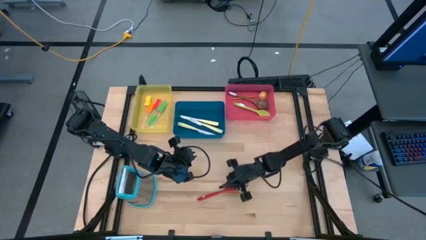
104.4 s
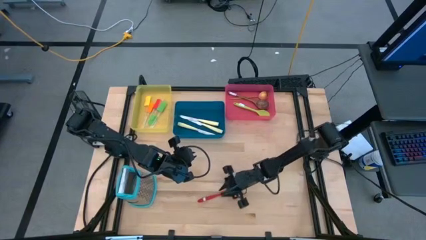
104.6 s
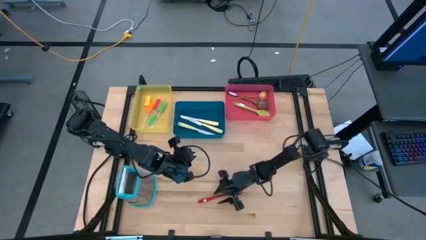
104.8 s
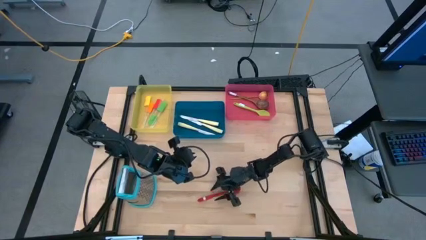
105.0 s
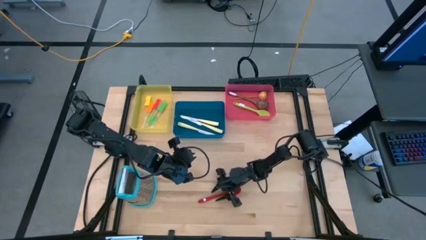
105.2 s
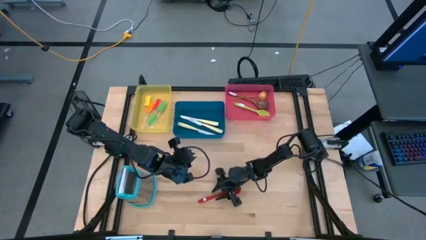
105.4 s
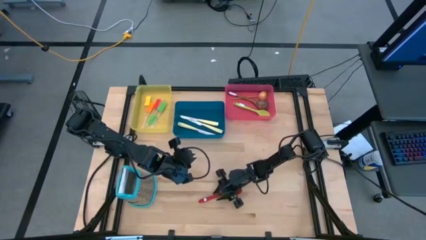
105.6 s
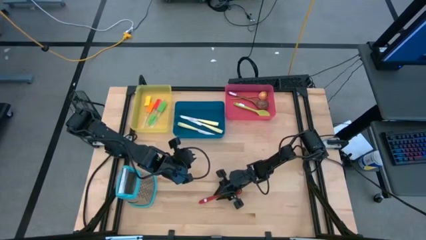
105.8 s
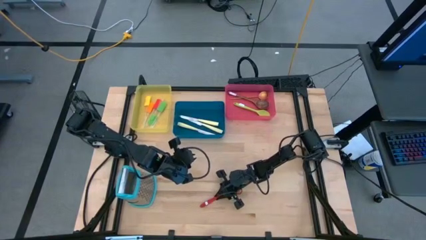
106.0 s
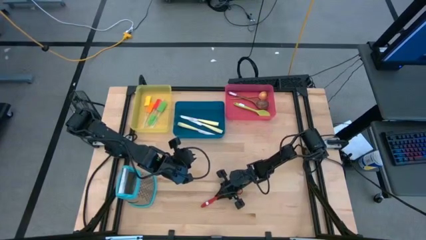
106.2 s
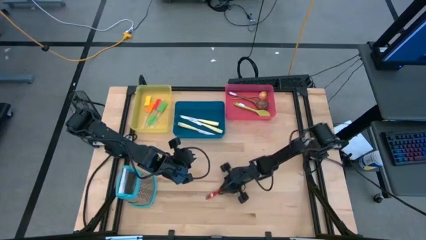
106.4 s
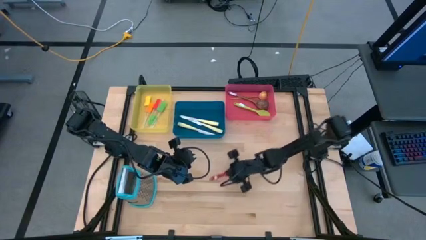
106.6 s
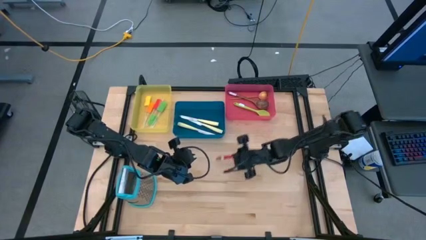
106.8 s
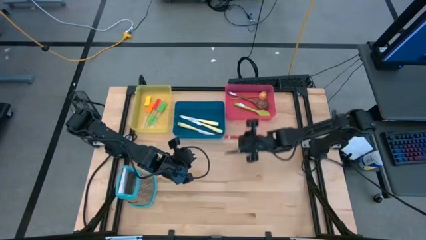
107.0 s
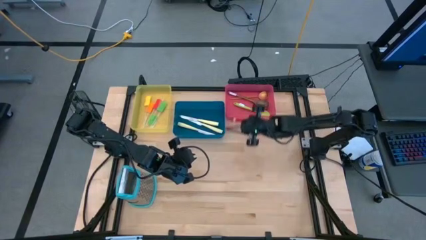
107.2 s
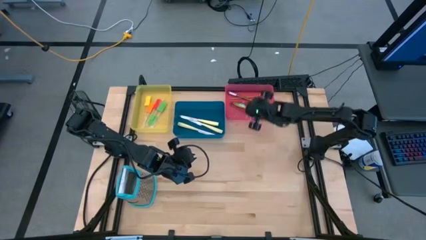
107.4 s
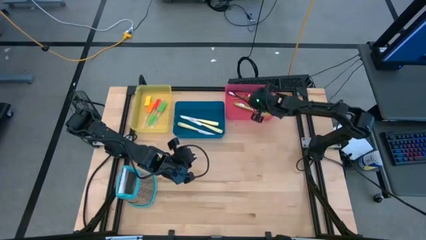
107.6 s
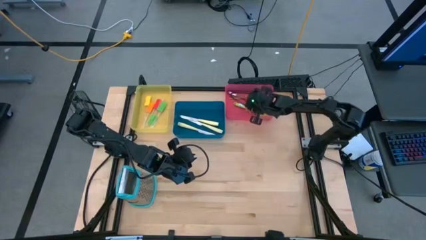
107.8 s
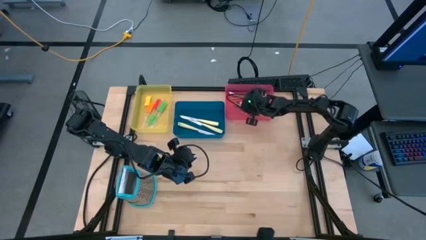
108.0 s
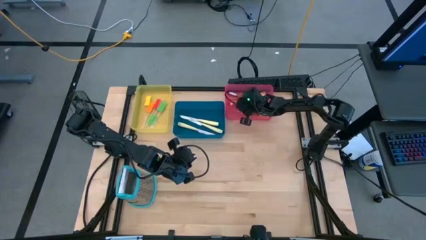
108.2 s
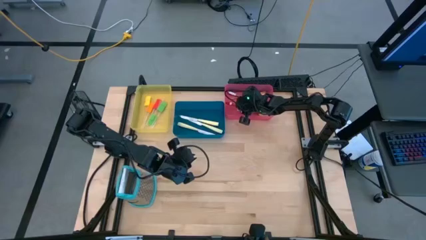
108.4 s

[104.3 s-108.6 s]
Task: Pick & Place Kitchen Items
Put the red serving spoon into the red bin

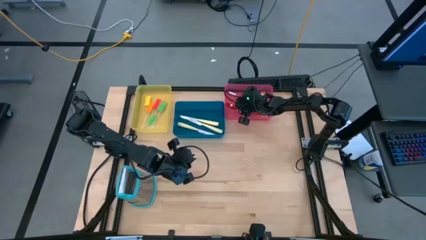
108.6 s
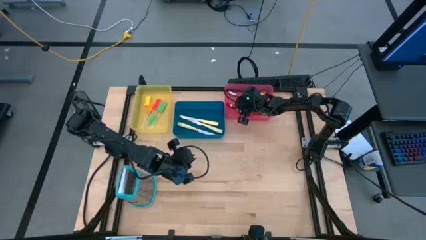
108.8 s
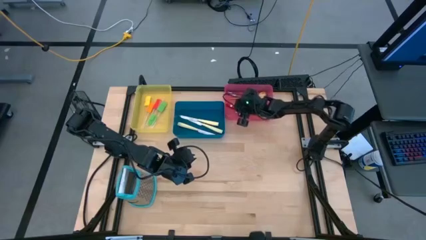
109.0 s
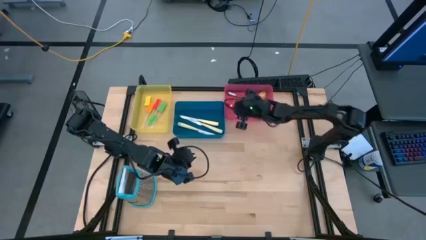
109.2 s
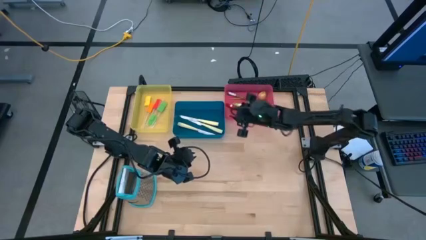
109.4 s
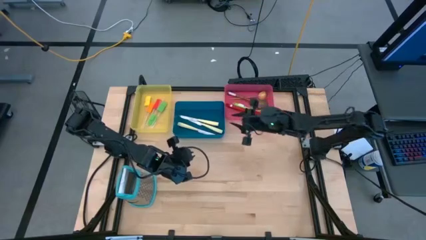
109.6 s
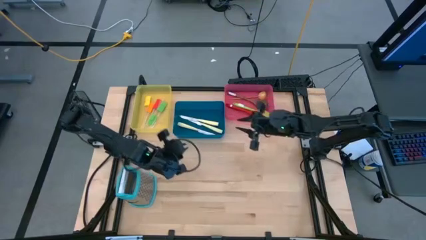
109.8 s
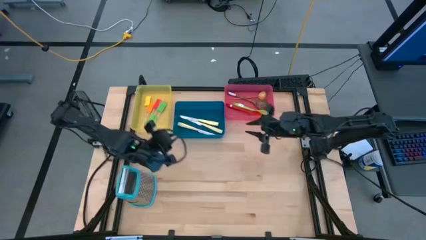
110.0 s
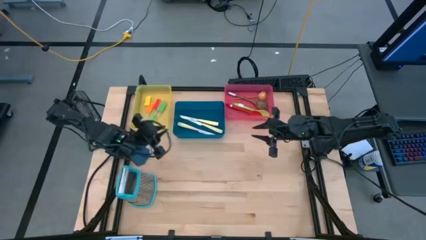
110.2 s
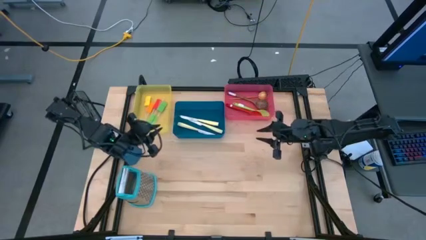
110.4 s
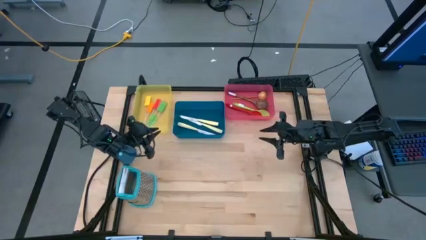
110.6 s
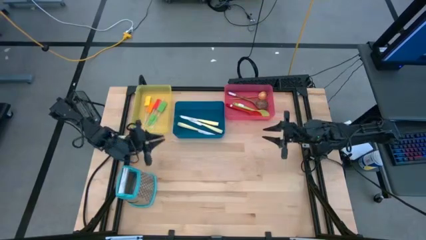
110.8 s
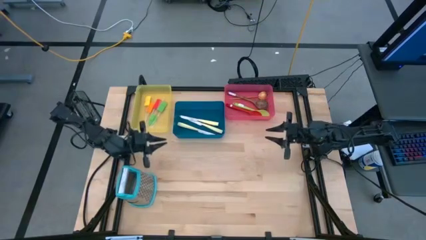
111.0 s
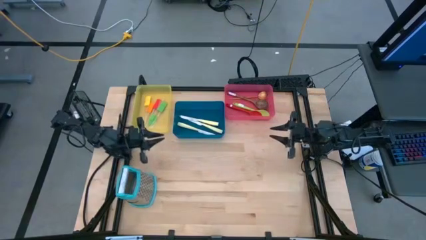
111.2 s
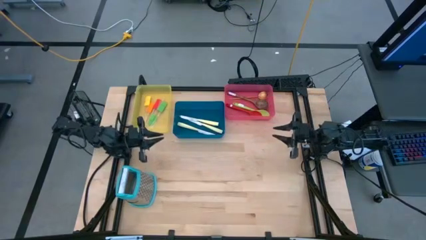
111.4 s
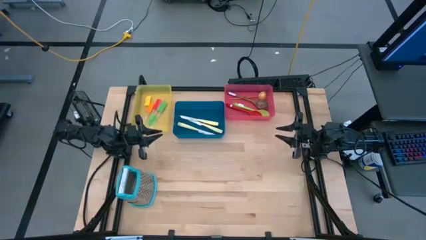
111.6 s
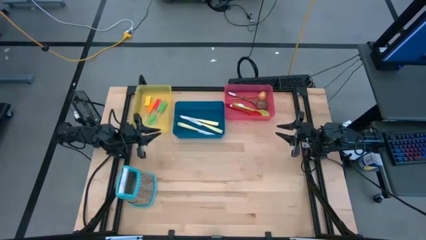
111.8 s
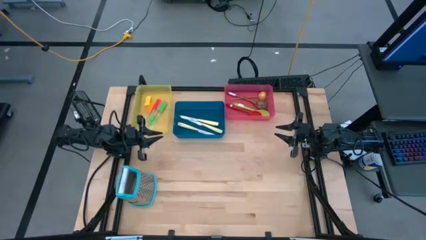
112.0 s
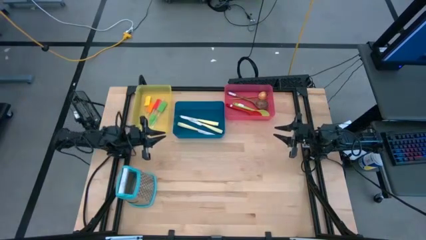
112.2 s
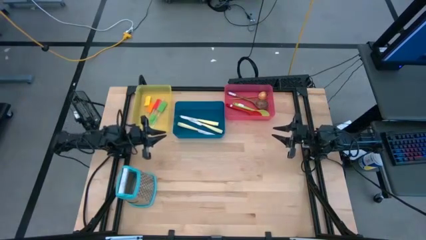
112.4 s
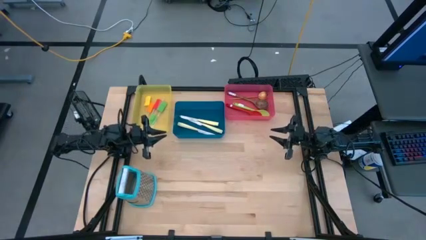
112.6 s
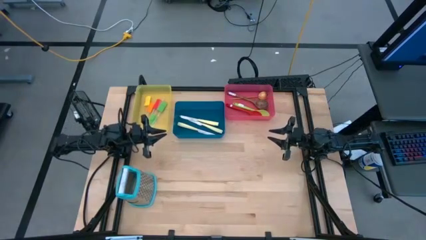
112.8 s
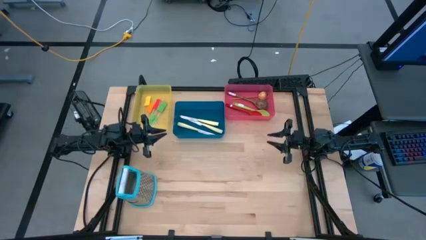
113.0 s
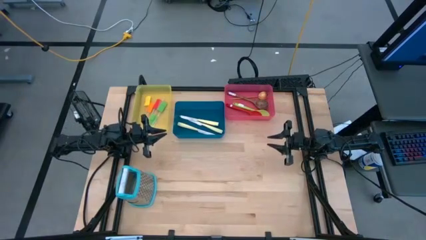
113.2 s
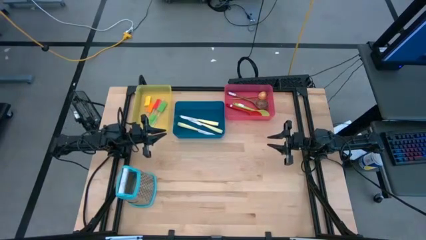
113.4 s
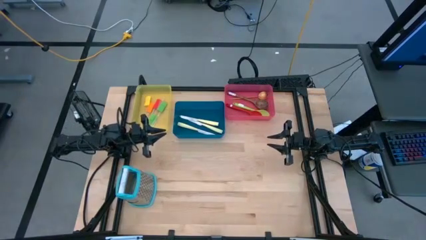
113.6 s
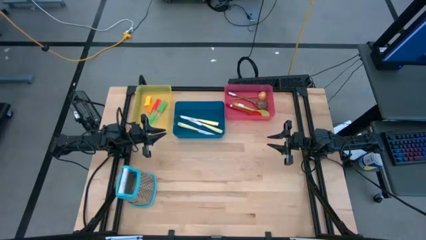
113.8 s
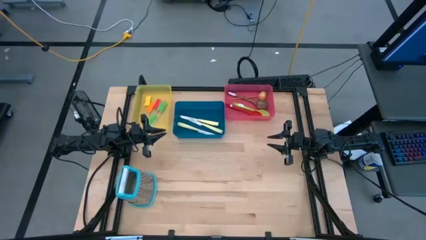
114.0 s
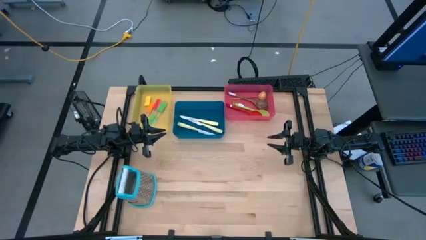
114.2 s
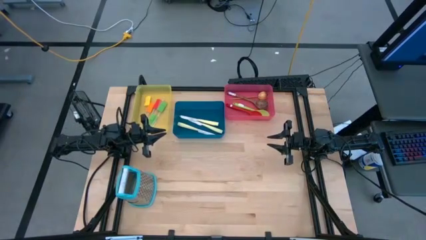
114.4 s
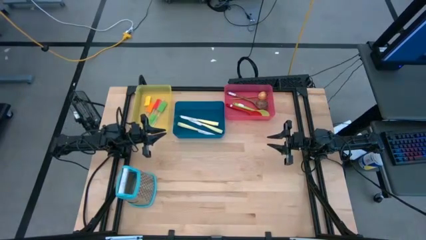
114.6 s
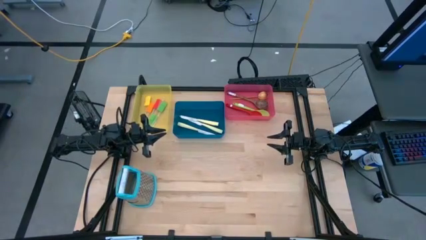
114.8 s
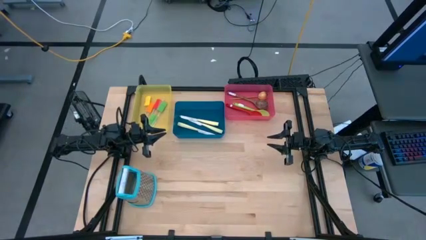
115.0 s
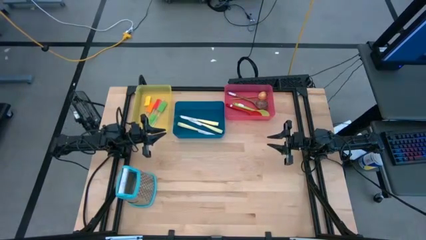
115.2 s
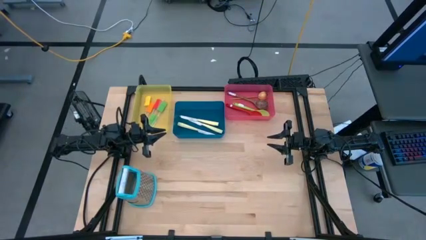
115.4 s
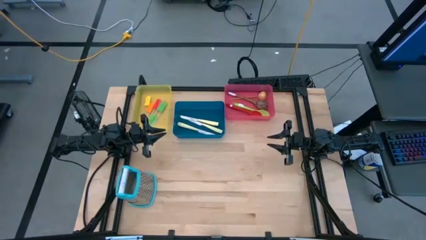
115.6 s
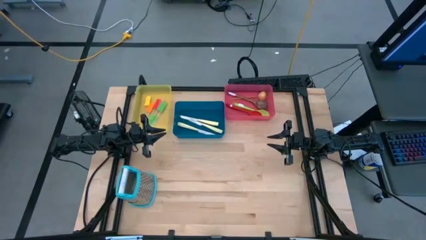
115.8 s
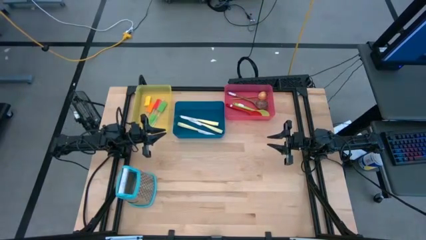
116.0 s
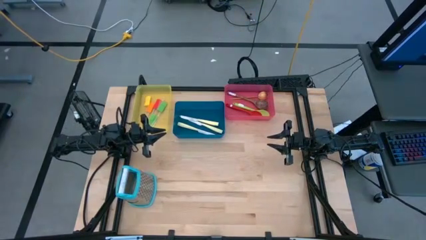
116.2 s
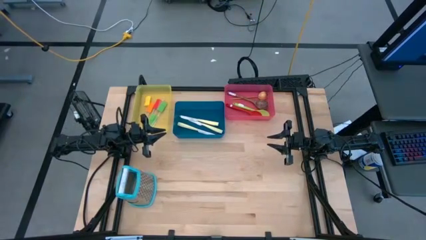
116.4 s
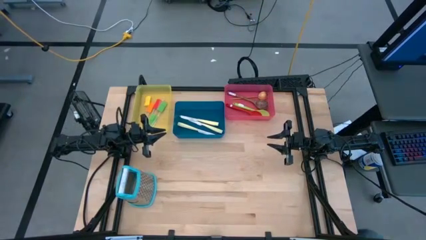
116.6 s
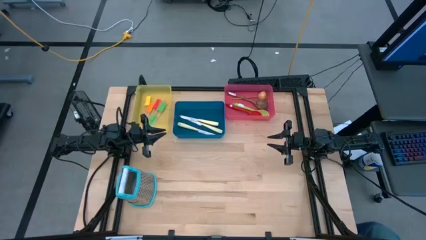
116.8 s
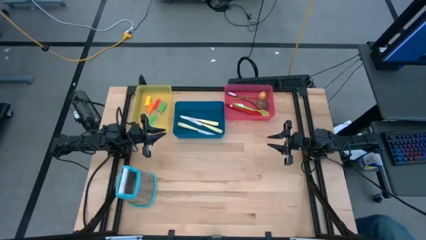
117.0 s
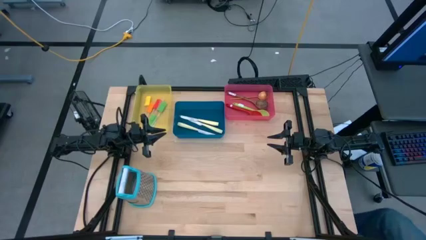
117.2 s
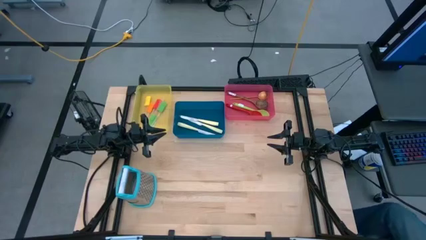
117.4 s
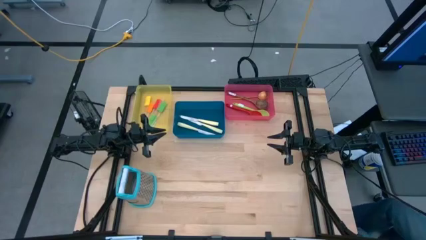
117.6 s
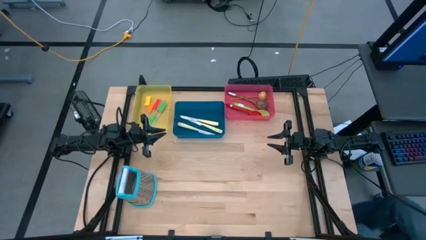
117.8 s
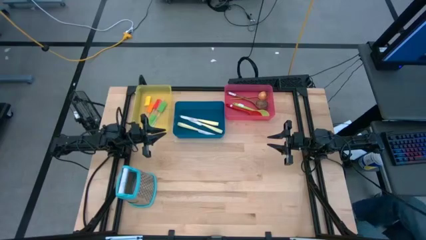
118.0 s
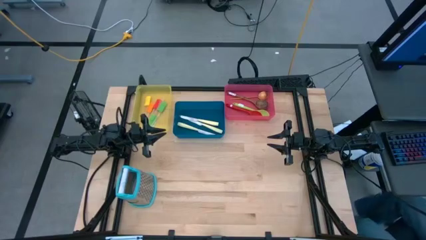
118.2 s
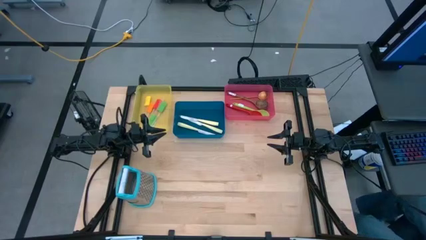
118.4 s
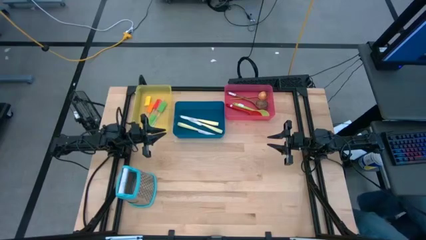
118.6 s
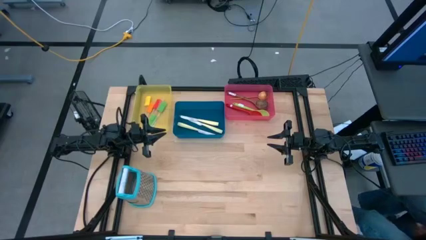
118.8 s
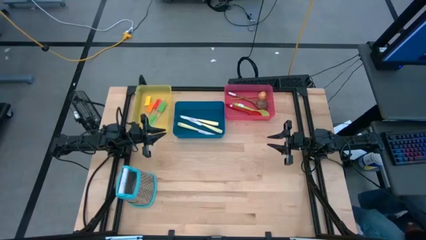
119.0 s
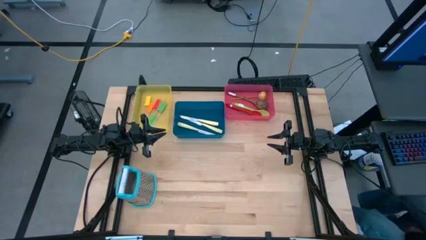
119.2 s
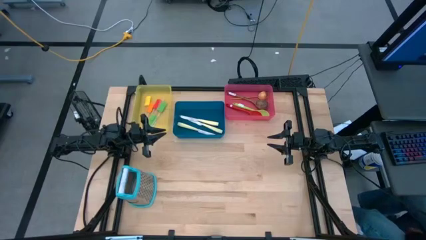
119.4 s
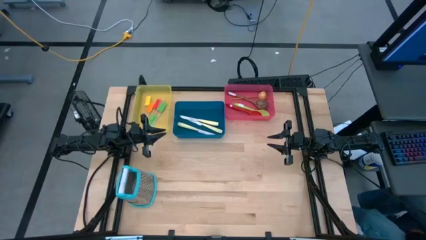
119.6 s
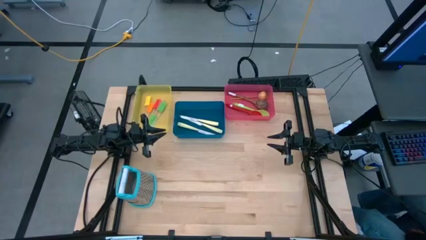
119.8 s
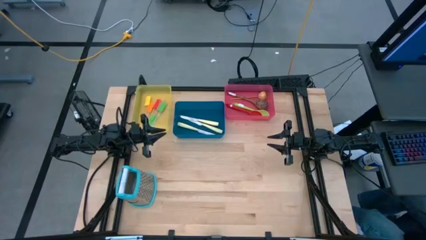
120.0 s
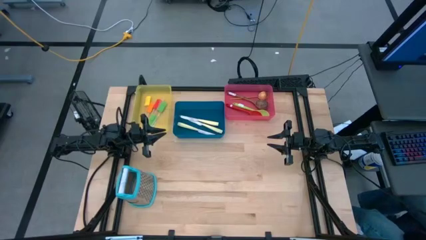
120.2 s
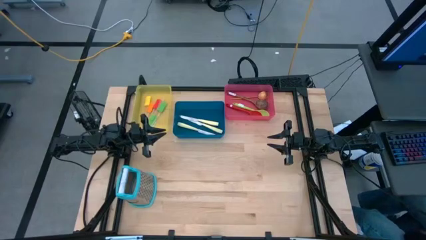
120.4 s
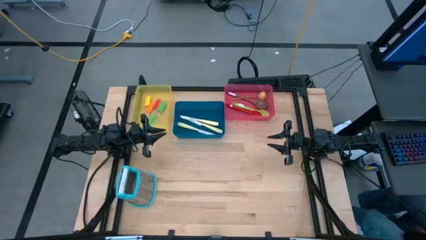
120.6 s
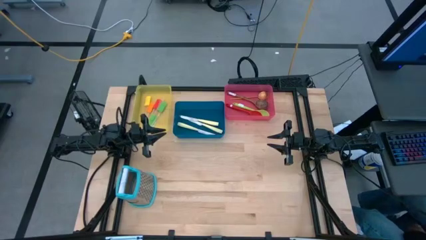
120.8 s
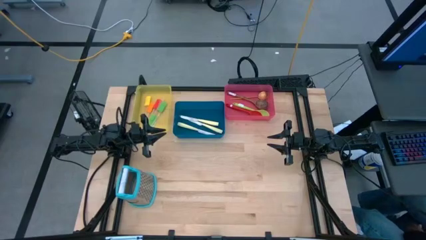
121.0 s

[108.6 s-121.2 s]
Return to Home Position
